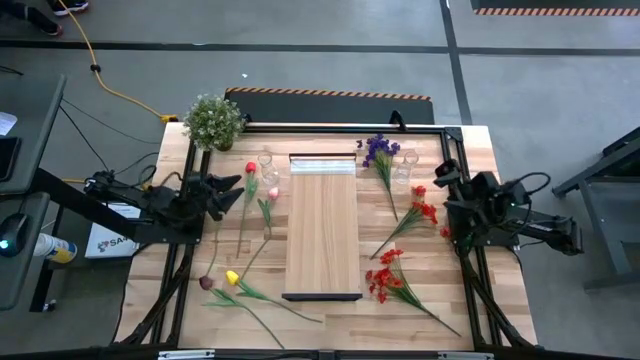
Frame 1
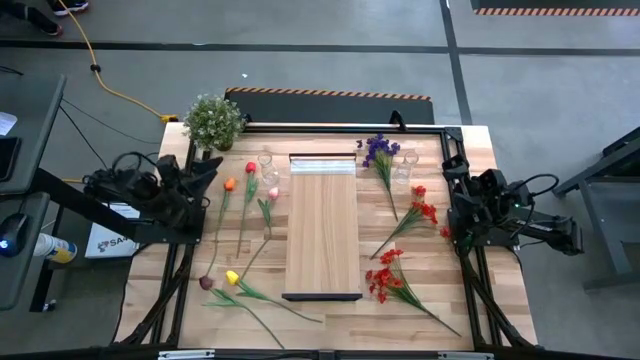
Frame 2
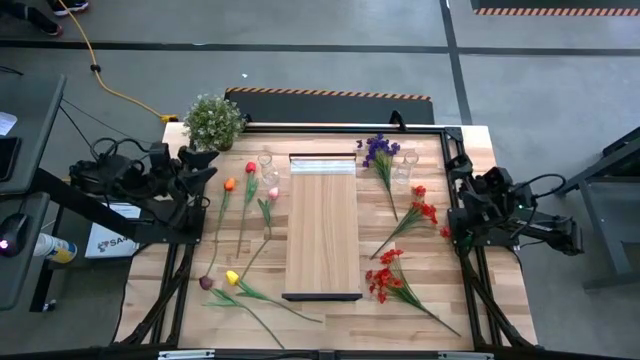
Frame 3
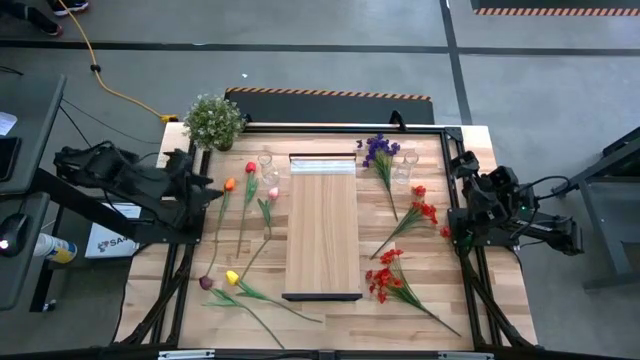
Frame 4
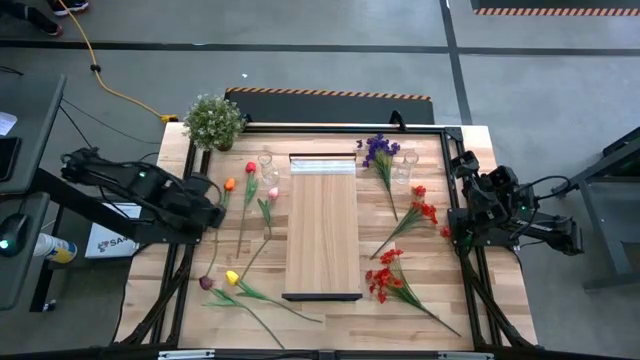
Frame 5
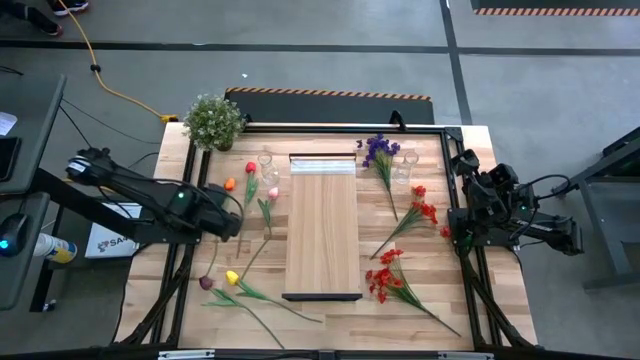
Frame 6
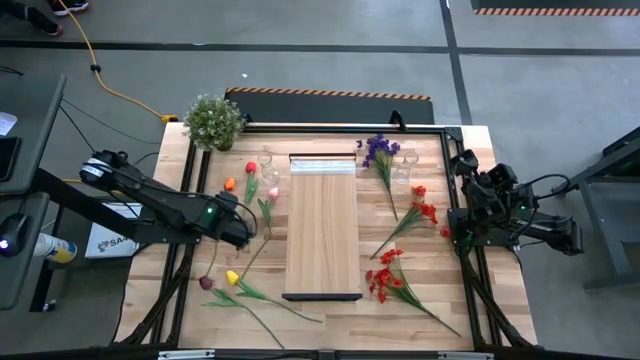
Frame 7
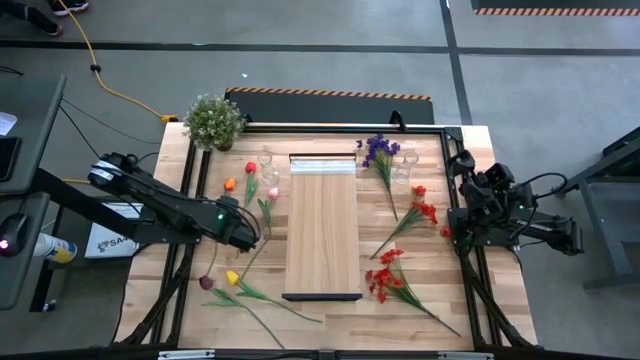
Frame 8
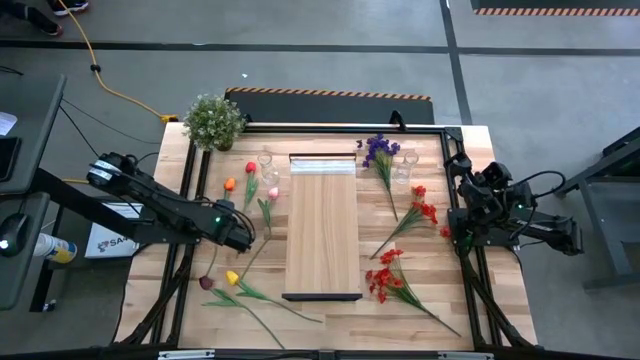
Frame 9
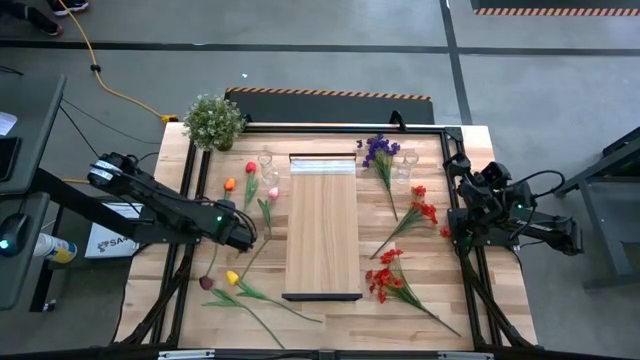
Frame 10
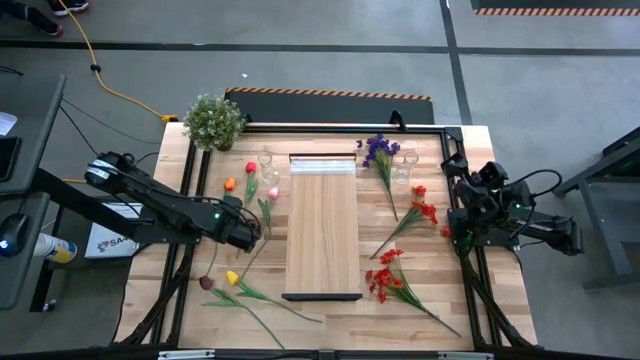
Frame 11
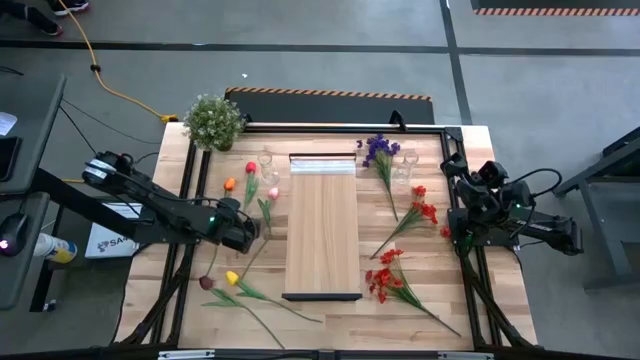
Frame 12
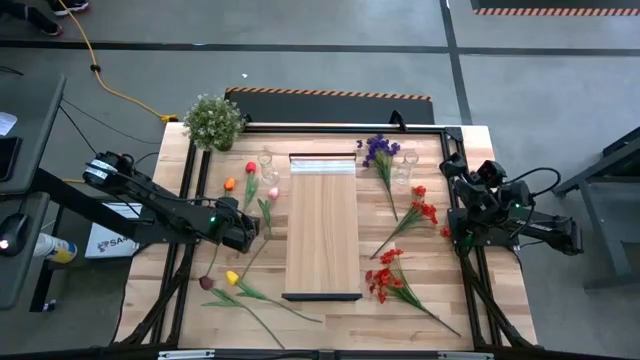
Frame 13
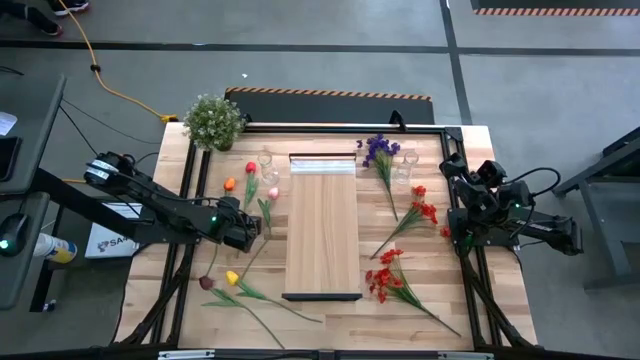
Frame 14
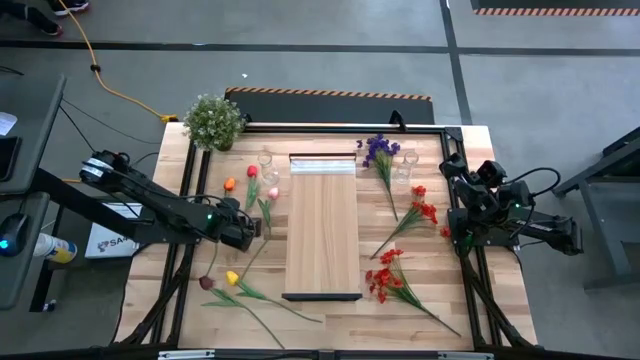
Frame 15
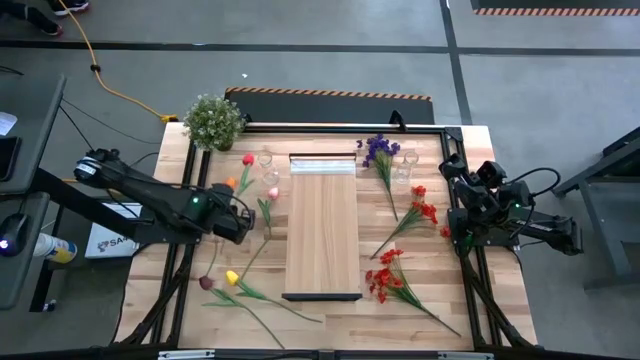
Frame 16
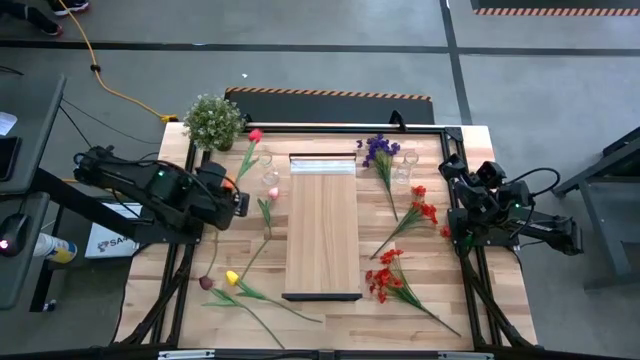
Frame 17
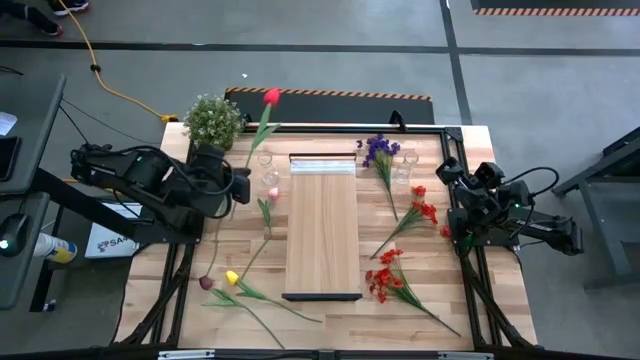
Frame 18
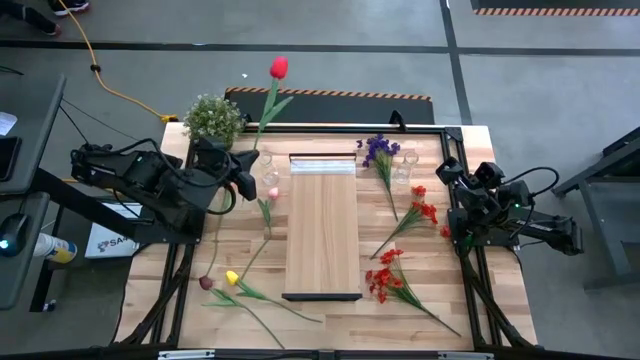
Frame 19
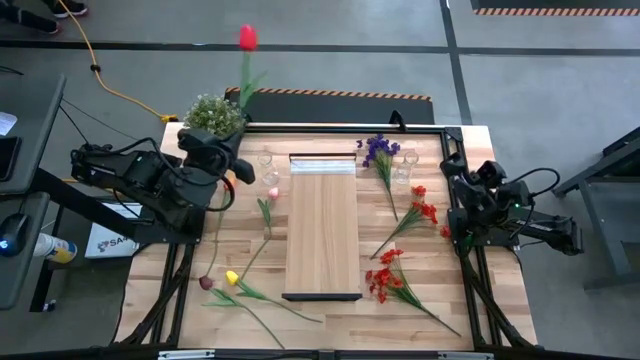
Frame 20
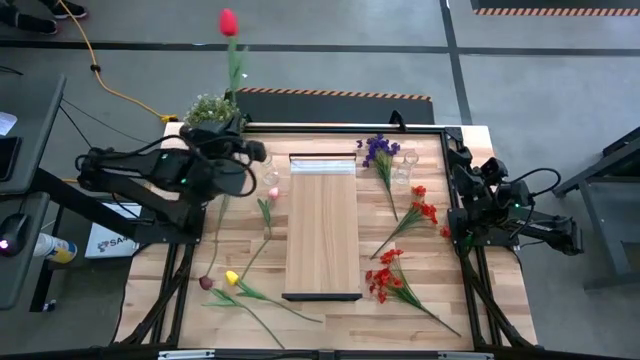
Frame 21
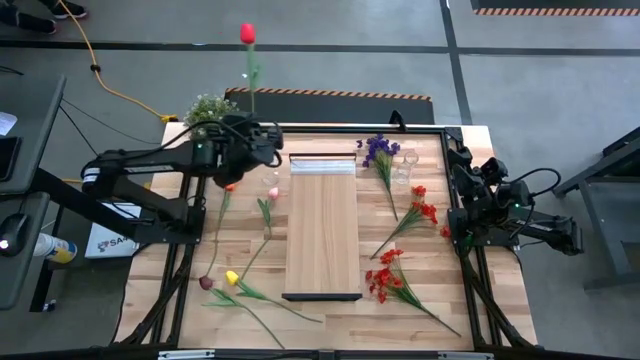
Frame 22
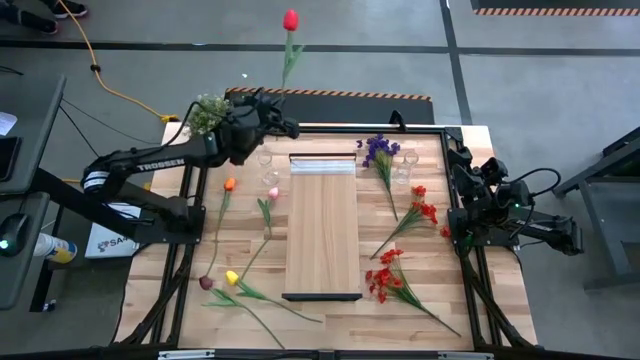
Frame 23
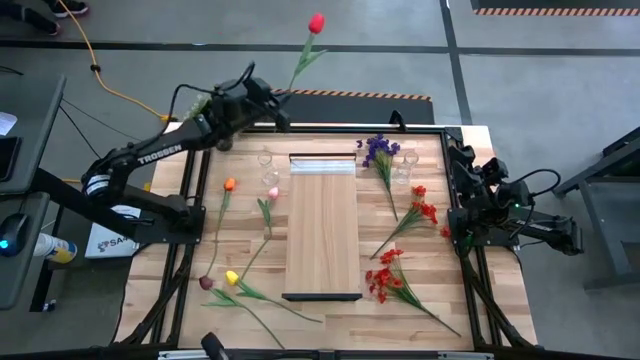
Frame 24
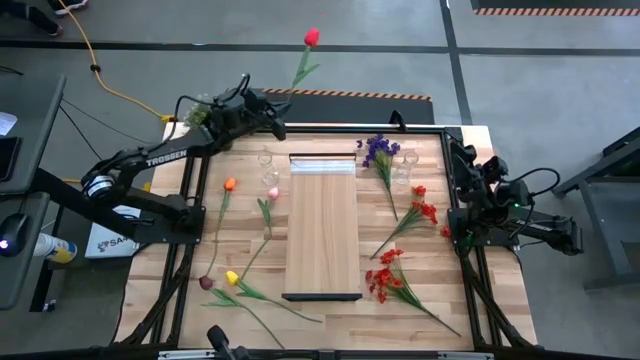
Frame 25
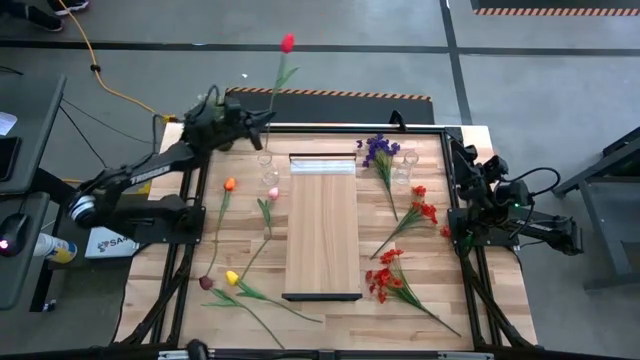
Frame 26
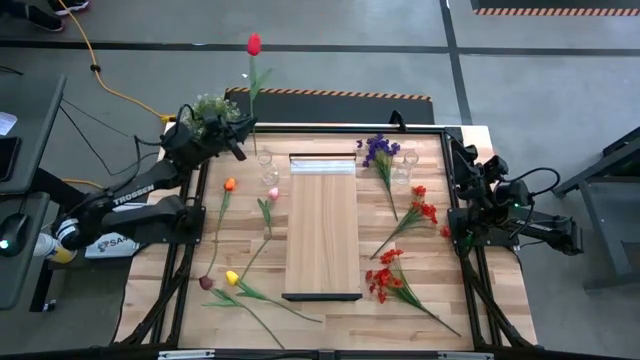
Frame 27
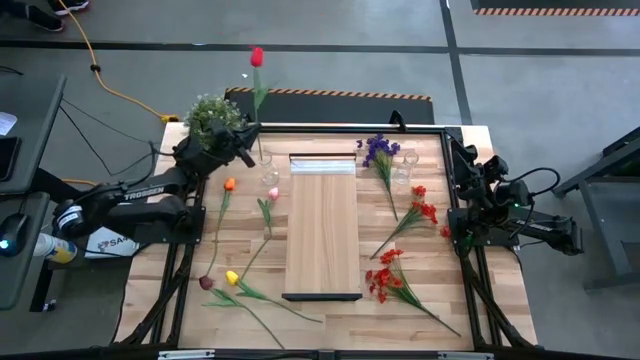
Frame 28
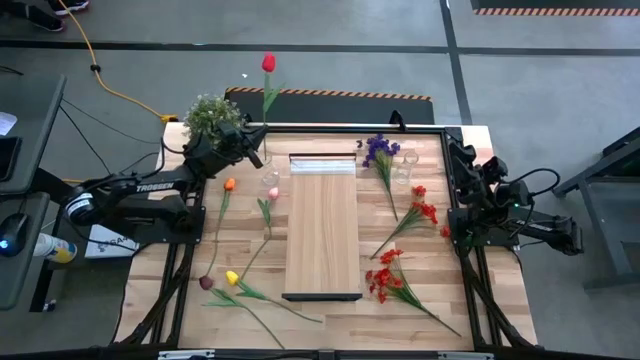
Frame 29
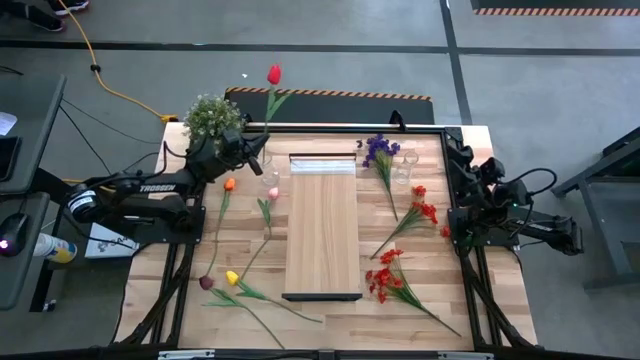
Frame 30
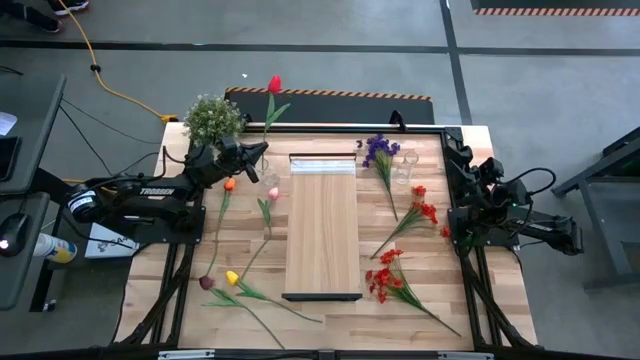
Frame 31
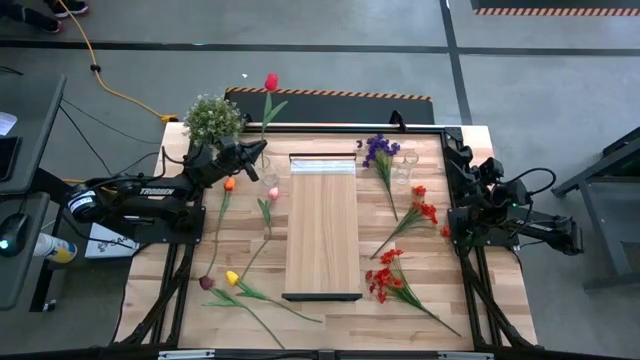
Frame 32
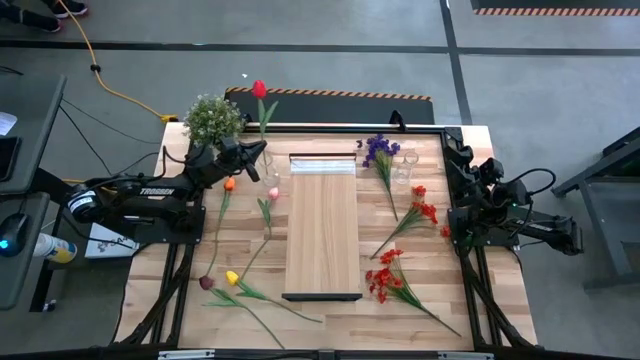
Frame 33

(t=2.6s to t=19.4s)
Task: Pick and place flowers into a vace then onto a shelf
Put the red flower into the left transparent vase

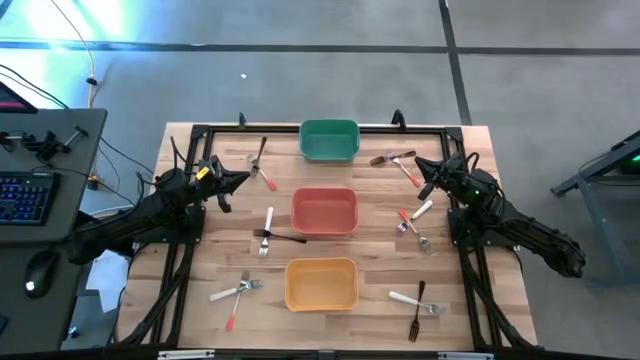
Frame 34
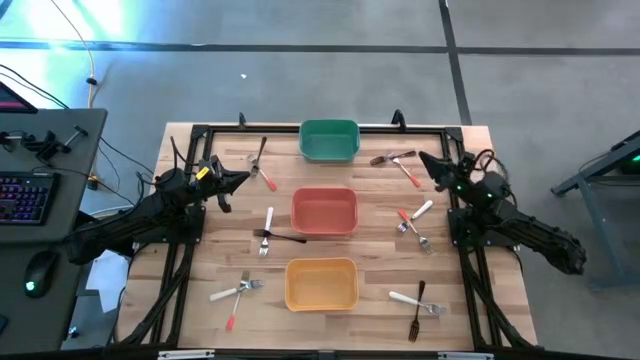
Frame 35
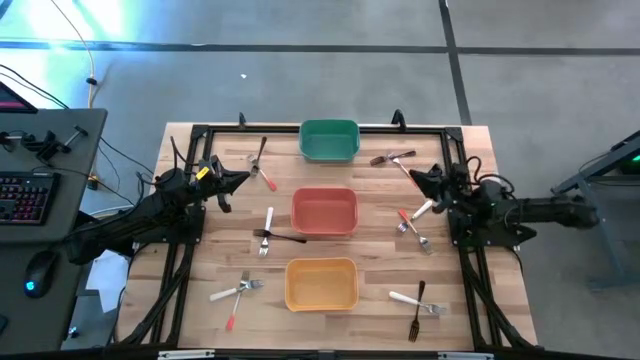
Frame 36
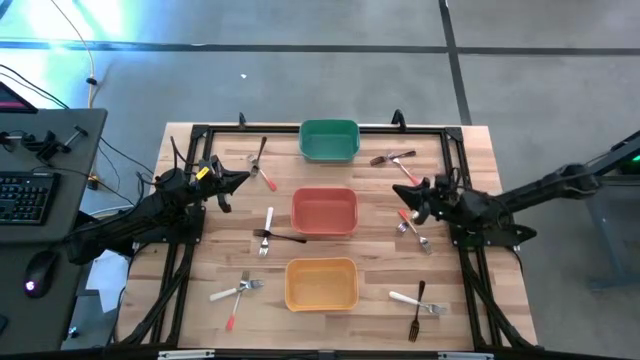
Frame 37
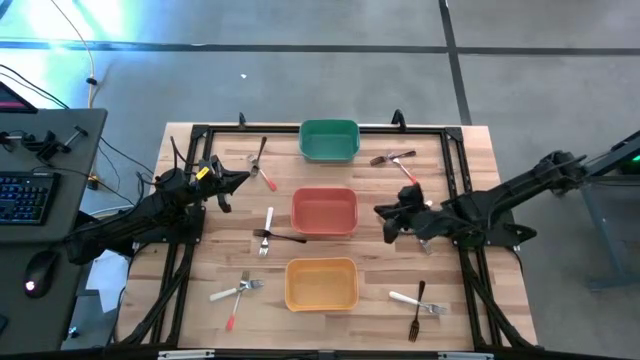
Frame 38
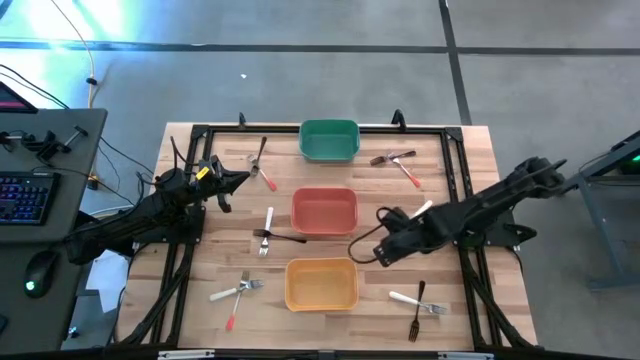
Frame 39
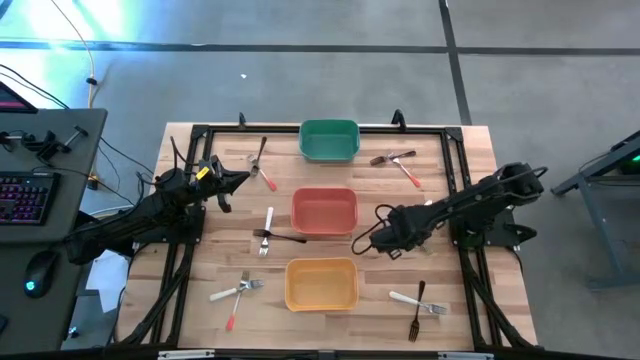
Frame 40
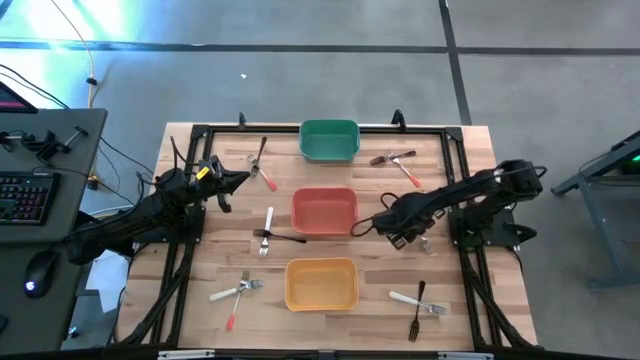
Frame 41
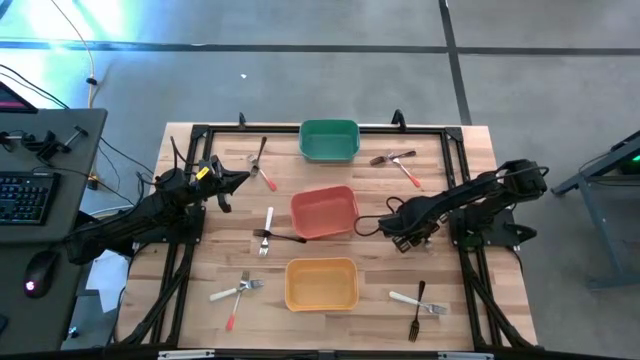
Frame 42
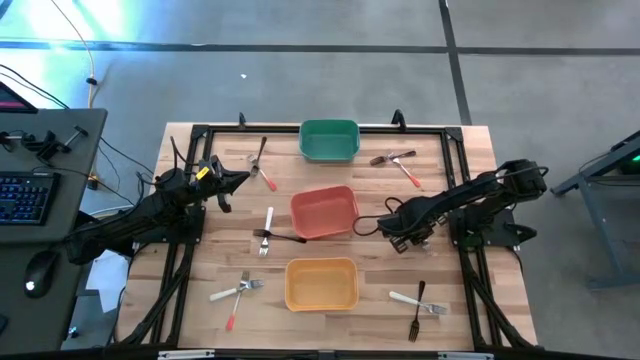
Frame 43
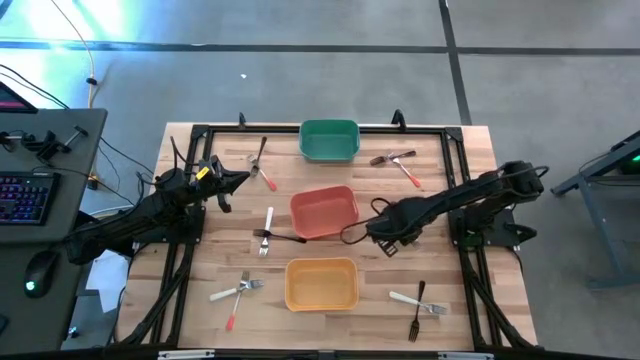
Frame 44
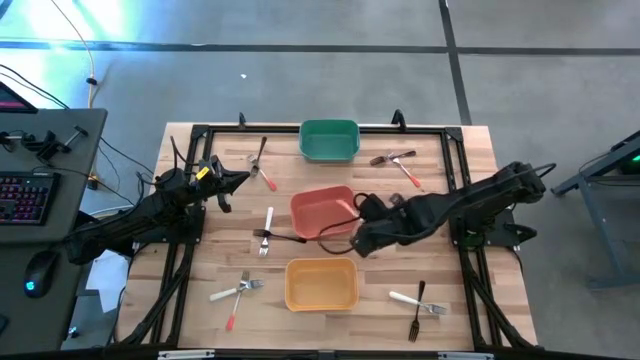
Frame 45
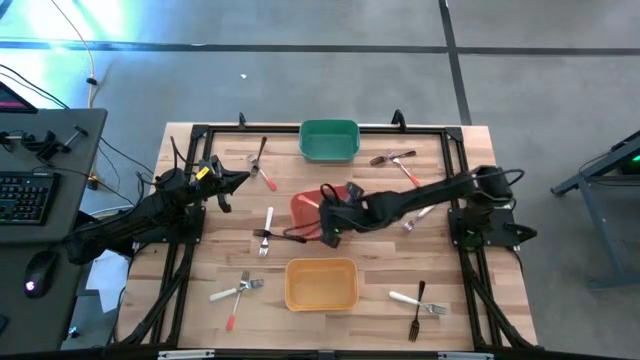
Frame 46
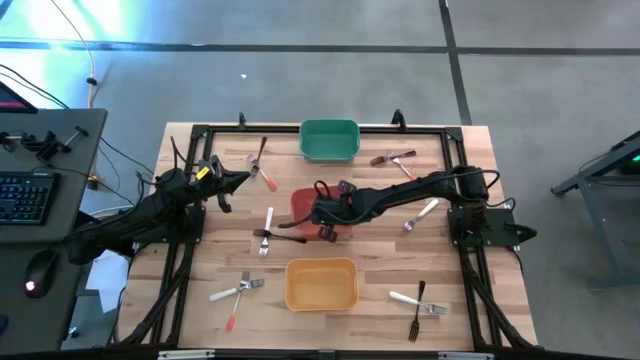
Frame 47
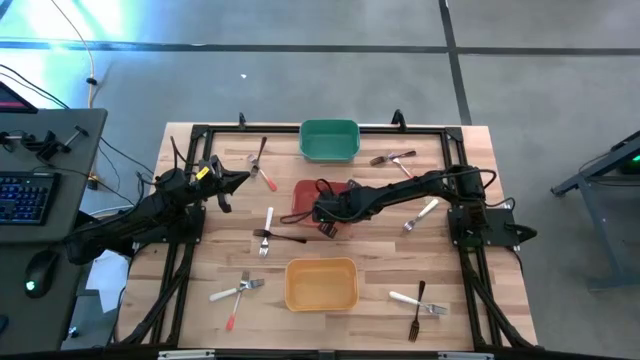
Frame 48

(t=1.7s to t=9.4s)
Task: Sort silverware by color (type)
Put the orange fork into the orange bin
